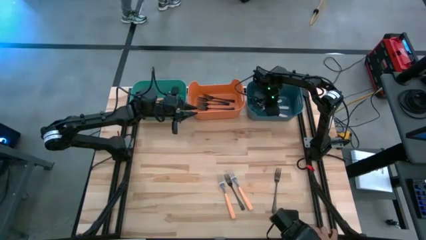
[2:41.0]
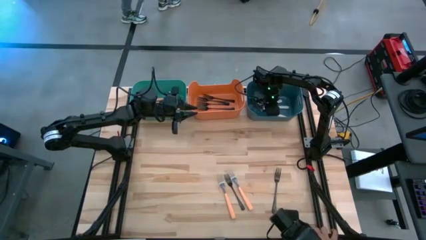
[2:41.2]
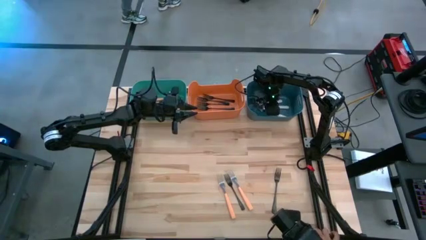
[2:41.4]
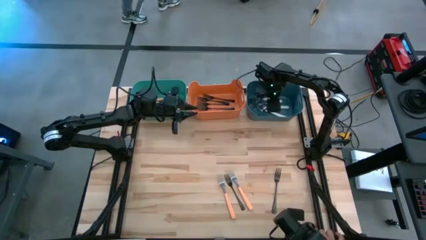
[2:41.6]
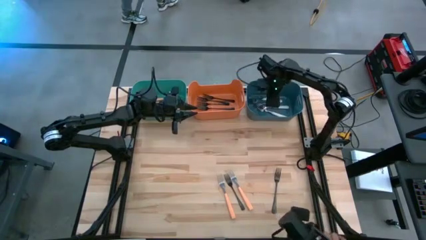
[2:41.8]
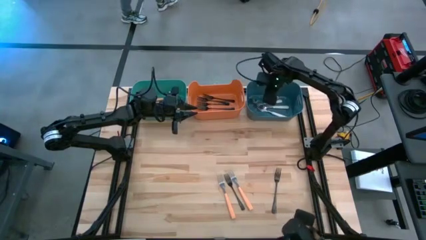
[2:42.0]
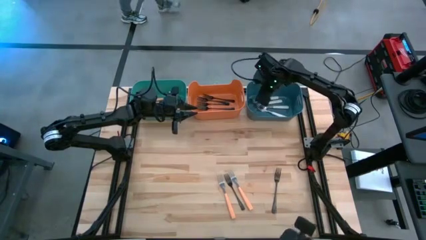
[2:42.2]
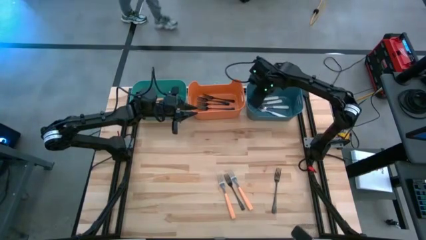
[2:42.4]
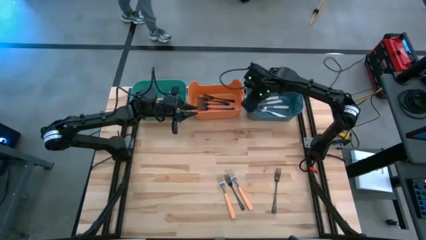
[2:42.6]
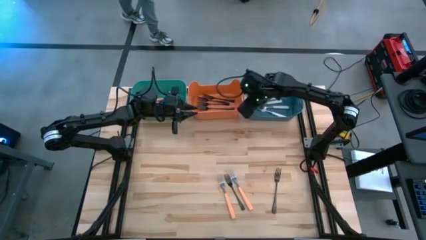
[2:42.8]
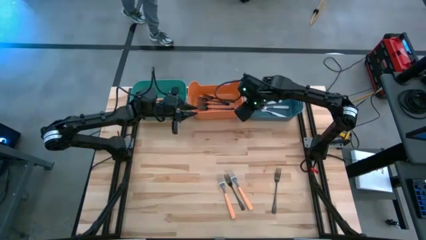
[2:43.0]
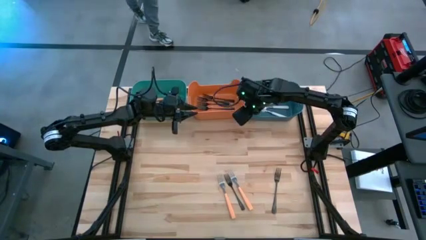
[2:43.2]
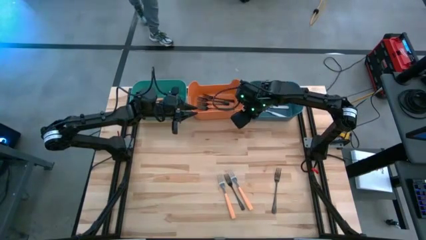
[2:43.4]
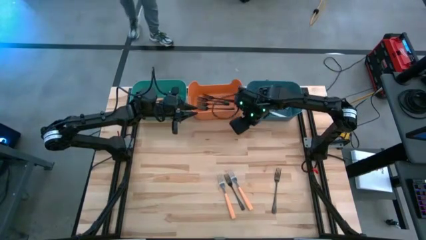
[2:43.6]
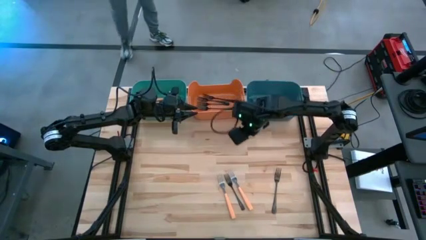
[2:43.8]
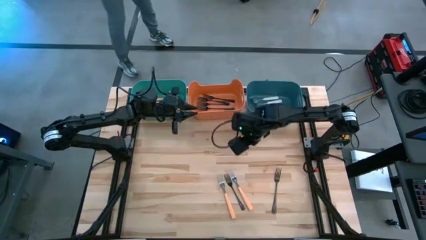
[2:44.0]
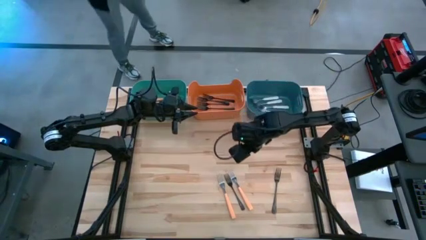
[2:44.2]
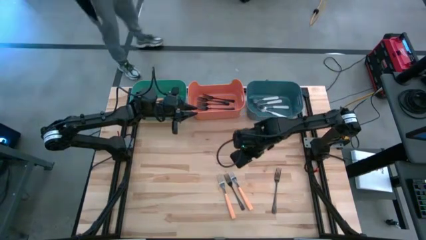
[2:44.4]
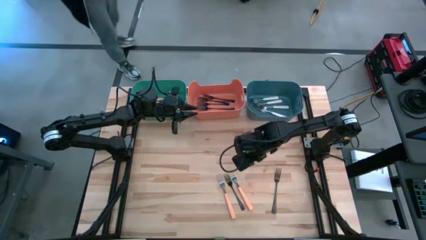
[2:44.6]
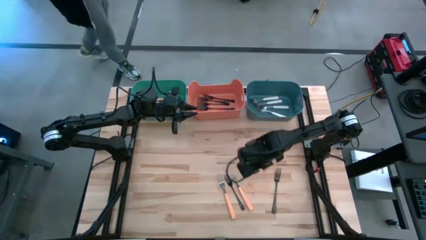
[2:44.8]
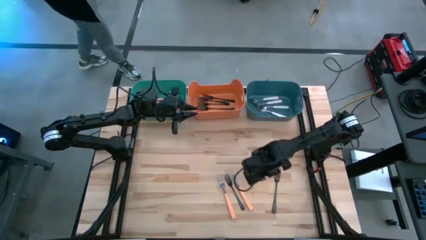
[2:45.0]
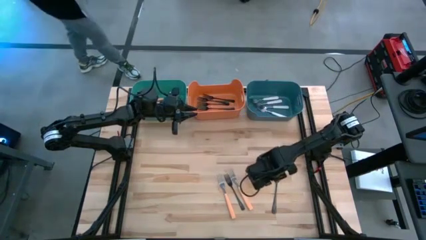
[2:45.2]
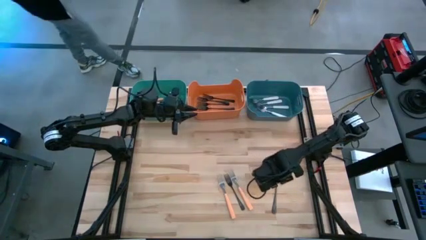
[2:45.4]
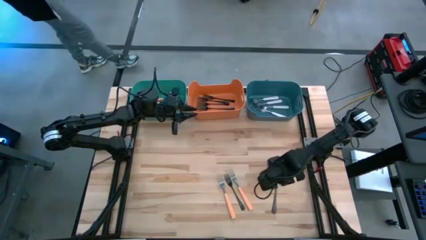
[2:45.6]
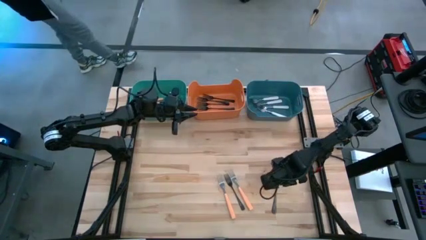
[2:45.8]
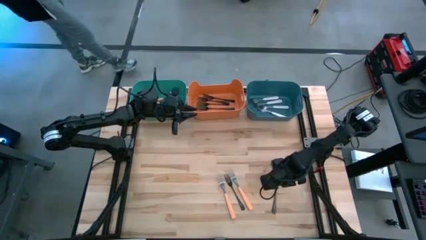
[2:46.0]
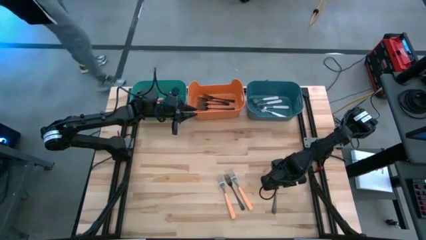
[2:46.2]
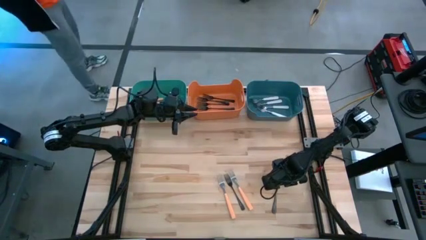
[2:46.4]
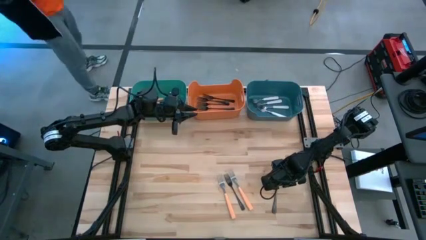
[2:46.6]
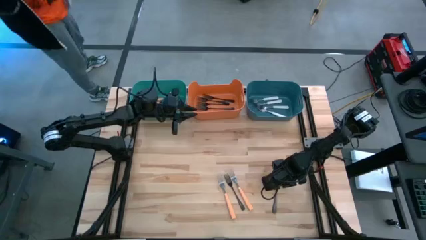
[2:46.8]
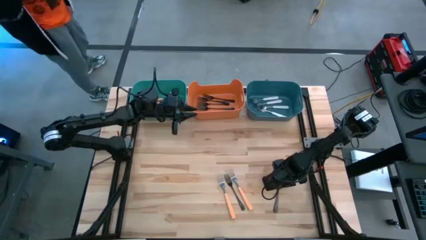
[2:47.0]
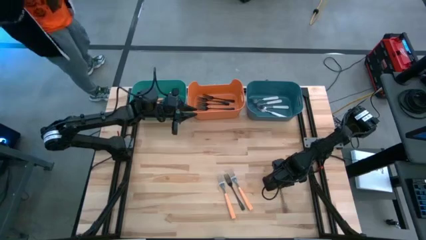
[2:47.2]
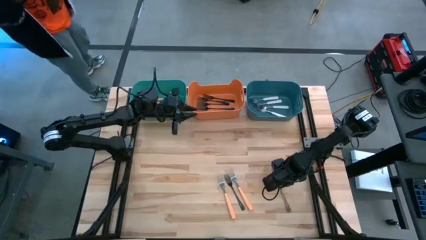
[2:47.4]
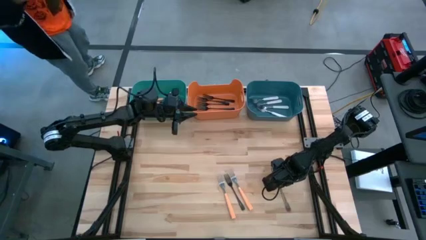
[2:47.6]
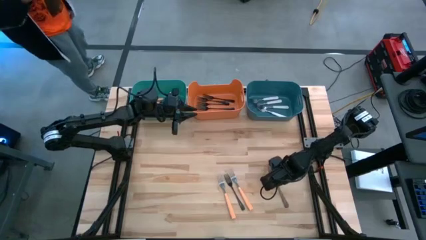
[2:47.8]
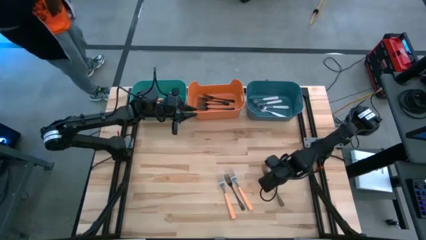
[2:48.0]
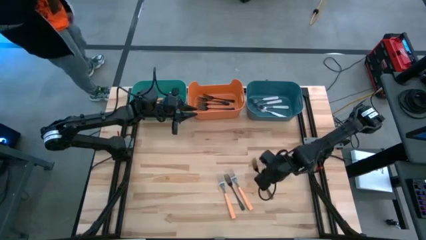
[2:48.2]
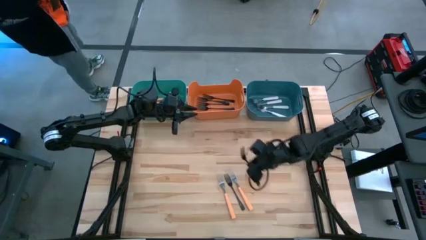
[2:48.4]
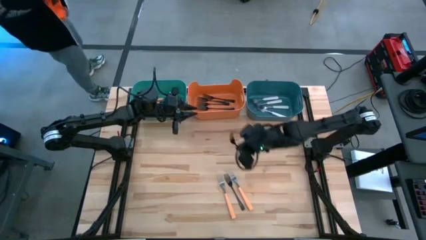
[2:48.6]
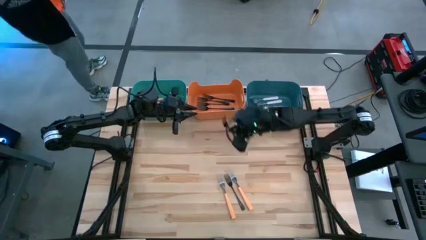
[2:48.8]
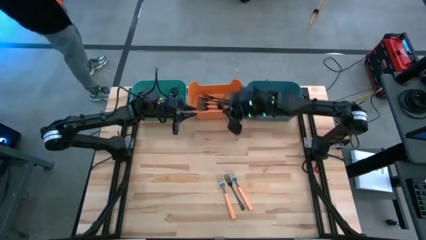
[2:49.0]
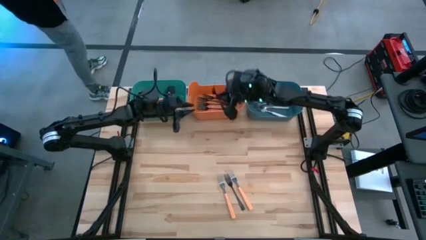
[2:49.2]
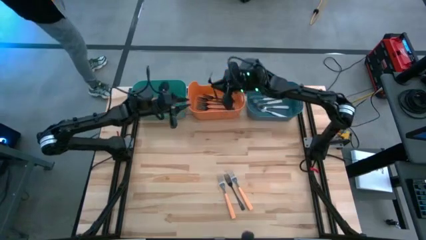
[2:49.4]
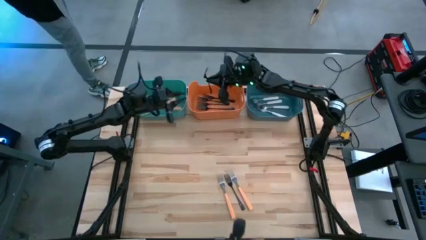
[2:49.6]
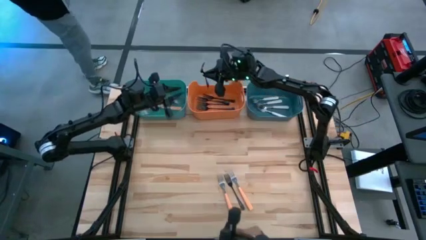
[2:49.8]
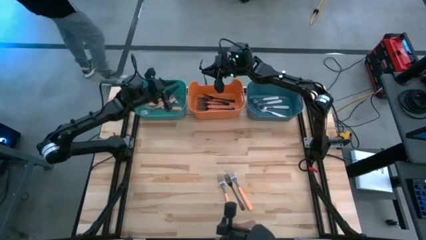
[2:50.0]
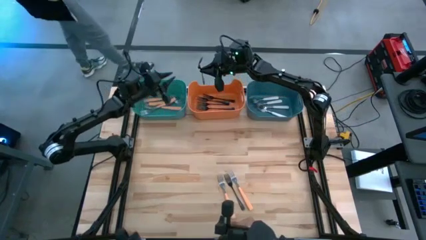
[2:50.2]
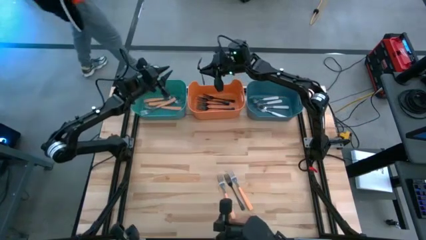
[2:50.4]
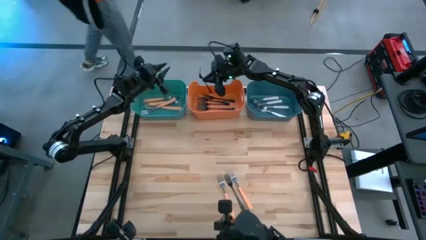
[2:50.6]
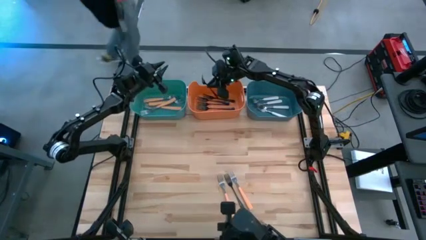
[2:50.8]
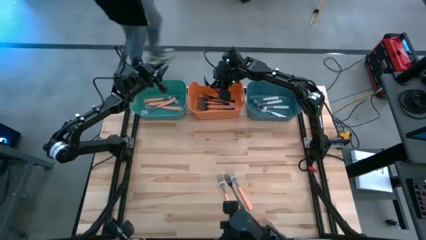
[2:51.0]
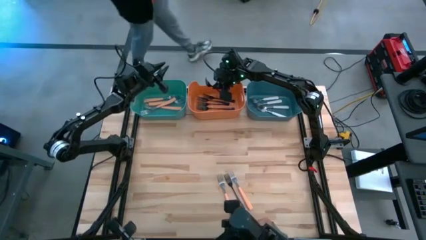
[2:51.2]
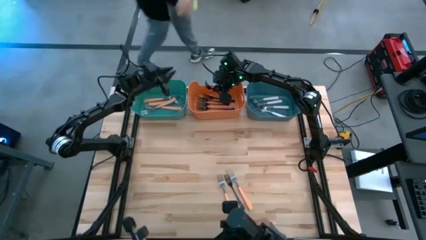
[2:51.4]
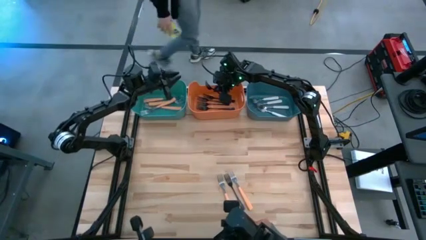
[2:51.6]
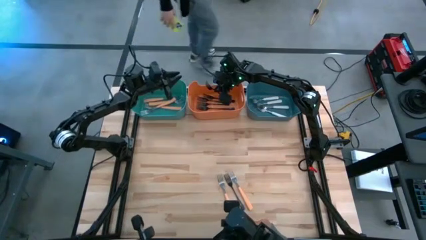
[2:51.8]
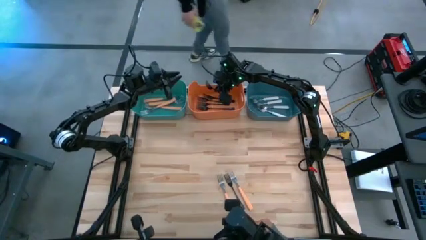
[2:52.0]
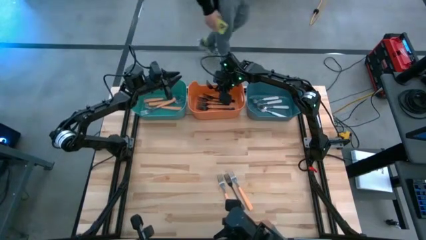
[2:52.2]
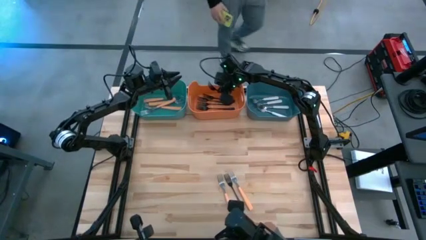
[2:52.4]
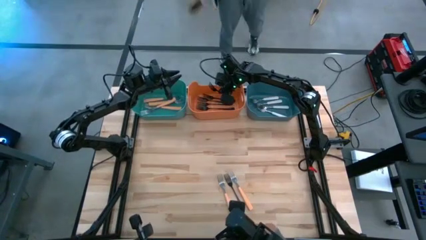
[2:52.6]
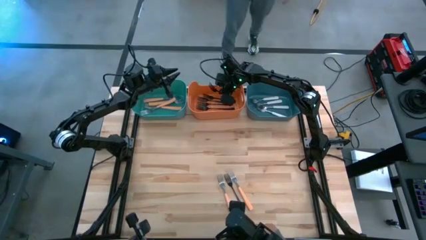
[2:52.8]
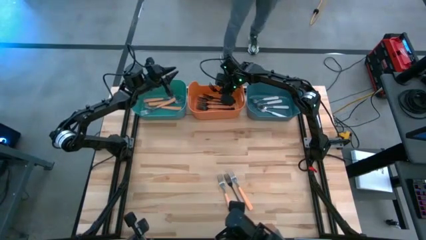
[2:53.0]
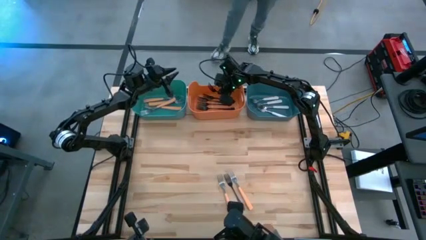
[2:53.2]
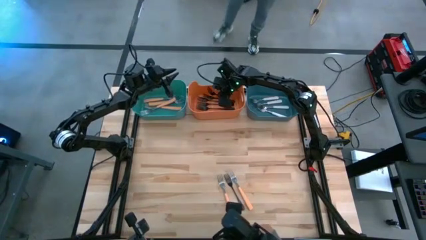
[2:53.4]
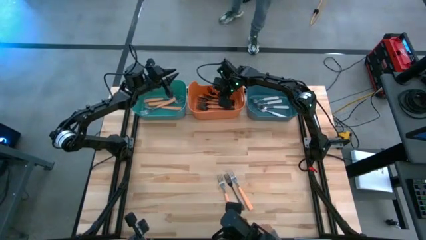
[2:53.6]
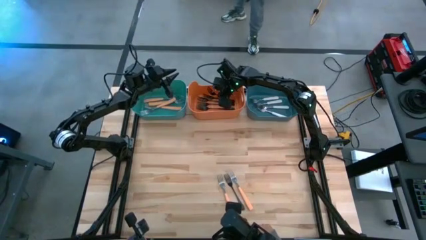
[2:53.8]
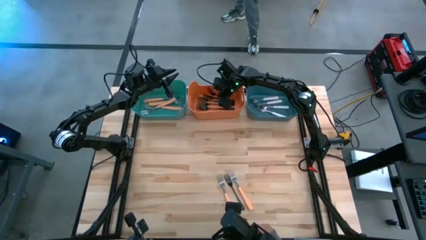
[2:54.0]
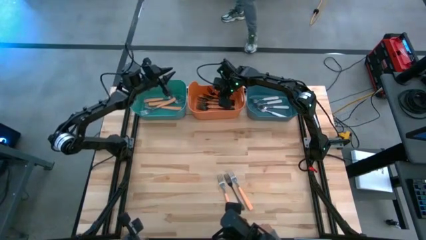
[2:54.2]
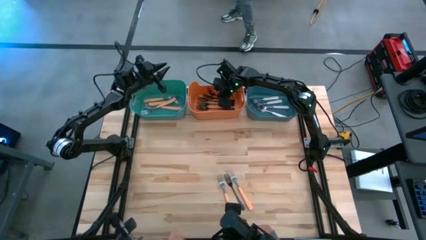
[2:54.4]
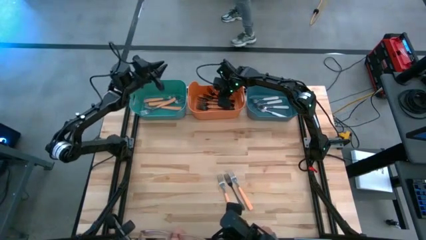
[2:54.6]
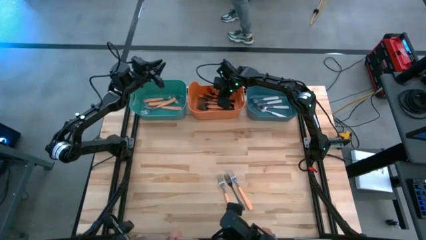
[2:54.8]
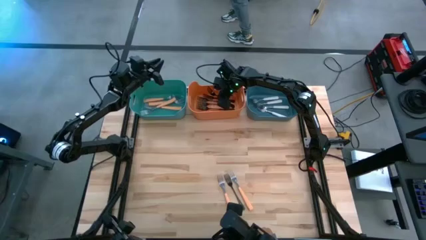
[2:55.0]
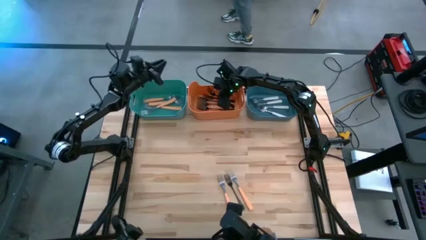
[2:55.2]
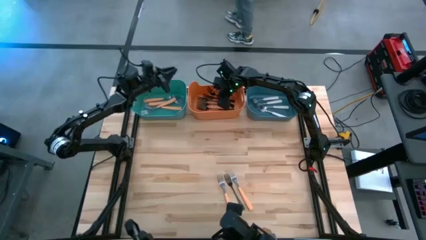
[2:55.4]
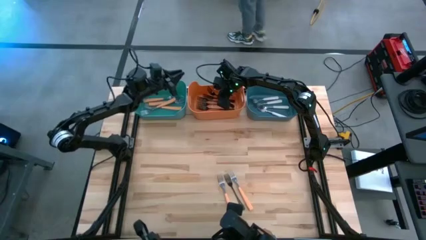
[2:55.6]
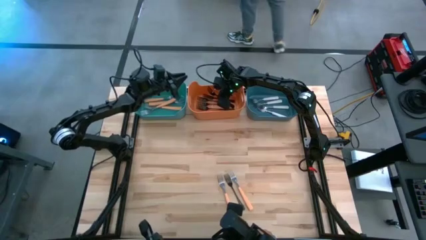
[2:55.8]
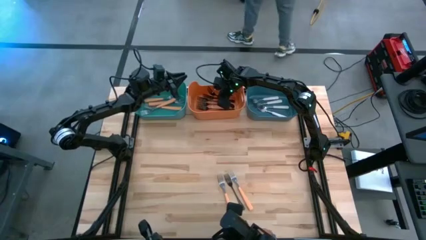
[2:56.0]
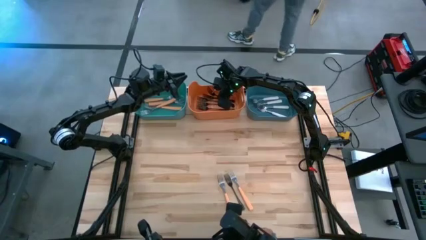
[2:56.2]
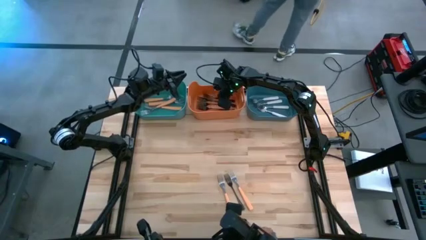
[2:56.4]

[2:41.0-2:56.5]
Task: Sort silverware by color (type)
Put the black fork into the orange bin

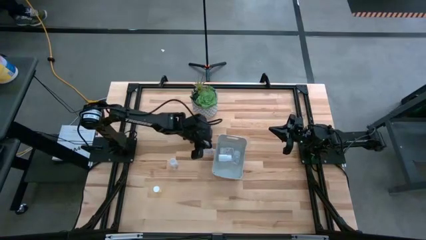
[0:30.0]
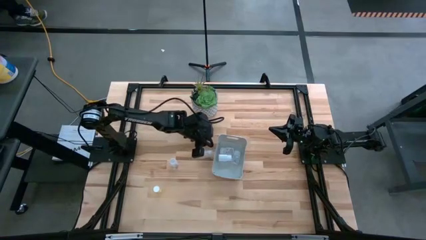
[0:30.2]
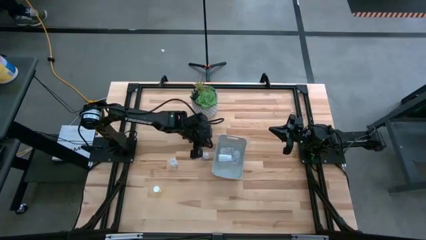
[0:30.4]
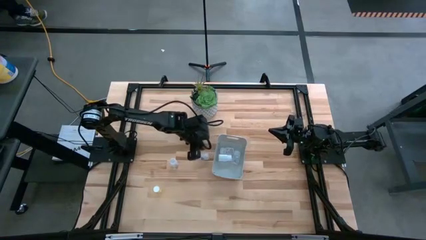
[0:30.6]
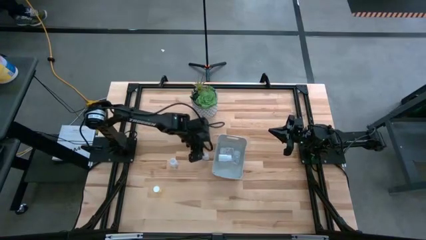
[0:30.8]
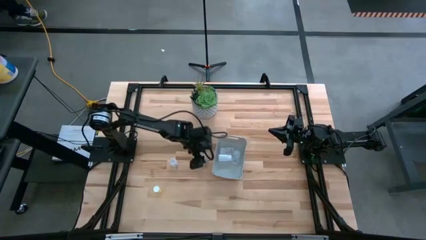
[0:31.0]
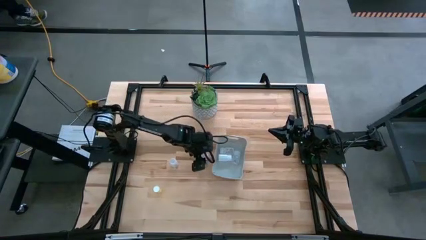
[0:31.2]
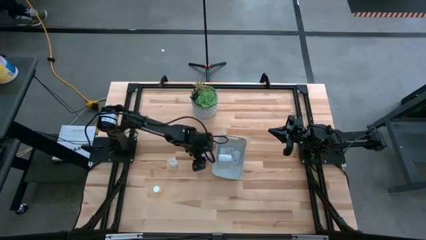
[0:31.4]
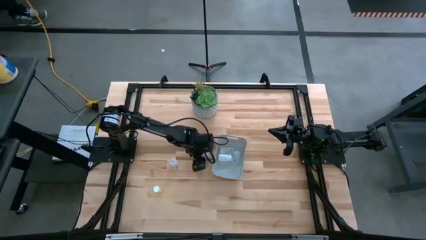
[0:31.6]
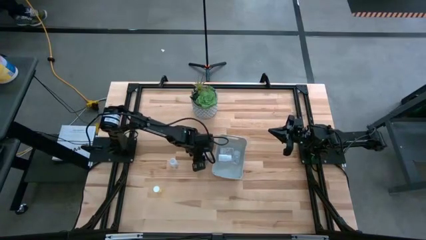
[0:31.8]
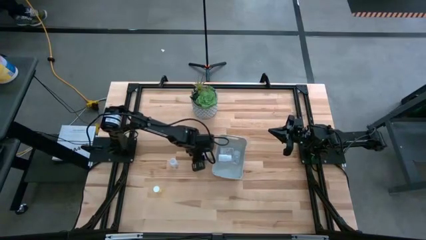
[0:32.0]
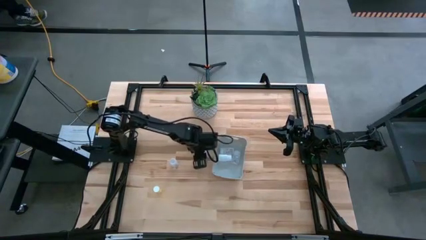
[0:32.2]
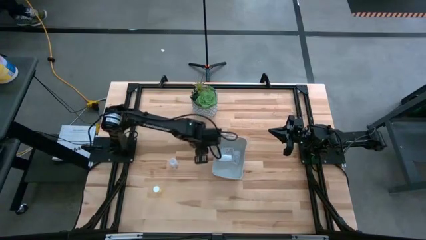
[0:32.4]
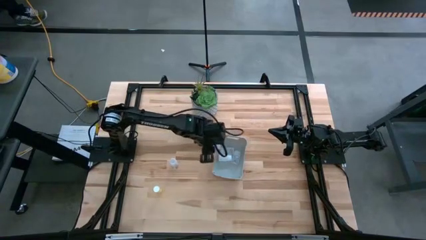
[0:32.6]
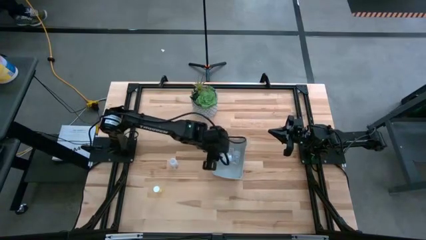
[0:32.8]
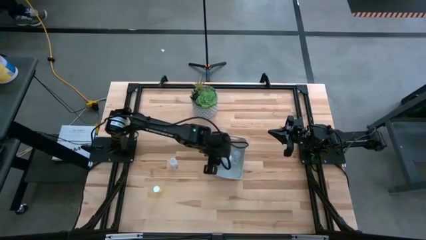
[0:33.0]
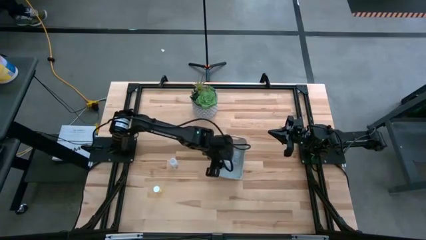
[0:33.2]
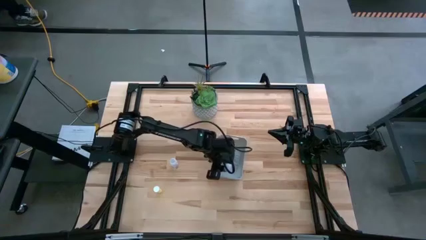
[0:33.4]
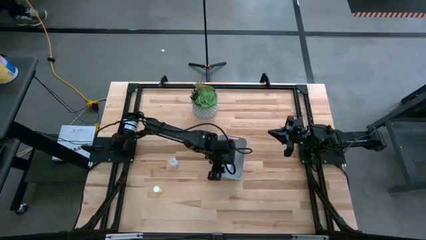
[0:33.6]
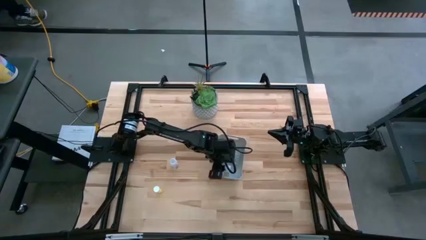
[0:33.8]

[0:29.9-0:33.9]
Task: Pick and place pill bottles into a basket
Put the top transparent medicine bottle into the white bin
